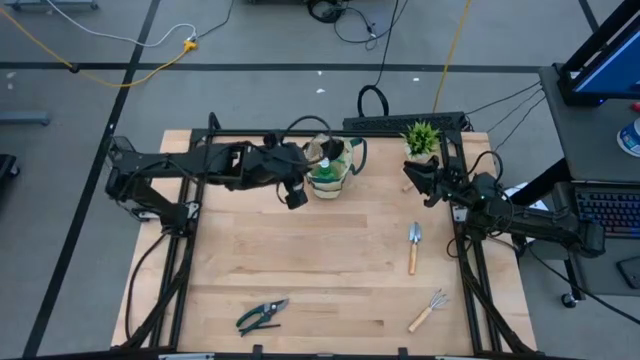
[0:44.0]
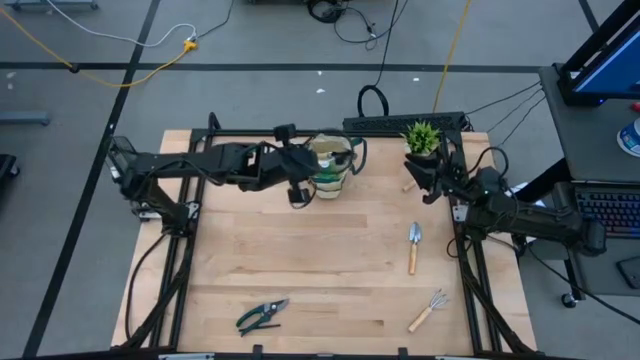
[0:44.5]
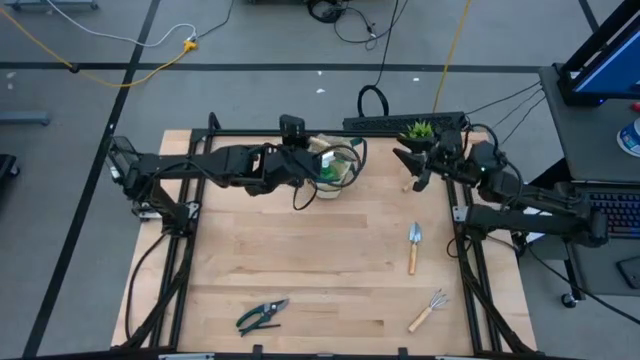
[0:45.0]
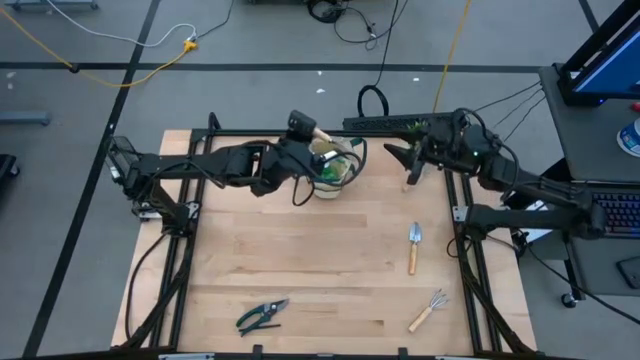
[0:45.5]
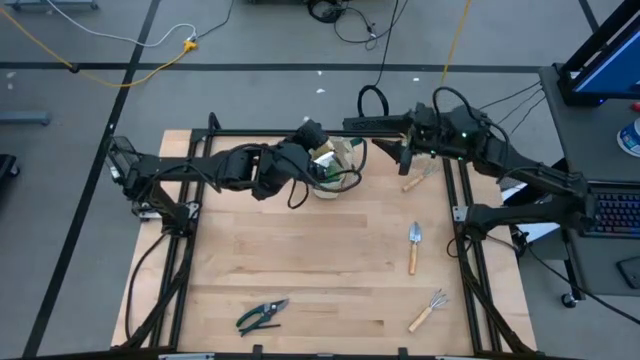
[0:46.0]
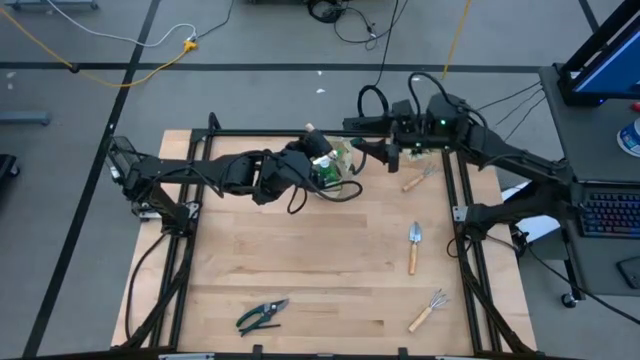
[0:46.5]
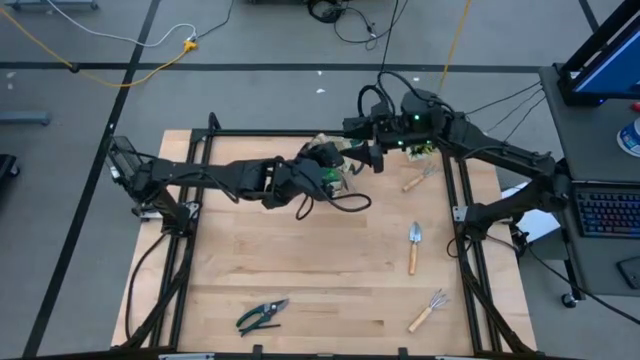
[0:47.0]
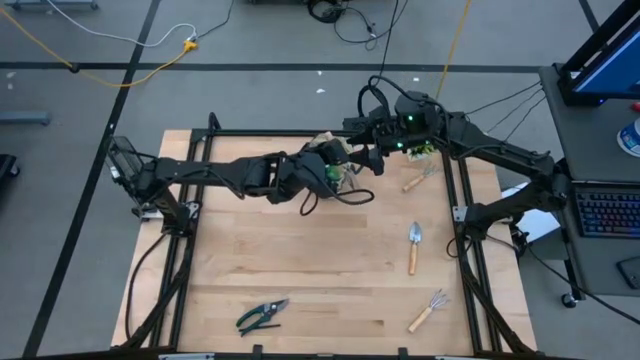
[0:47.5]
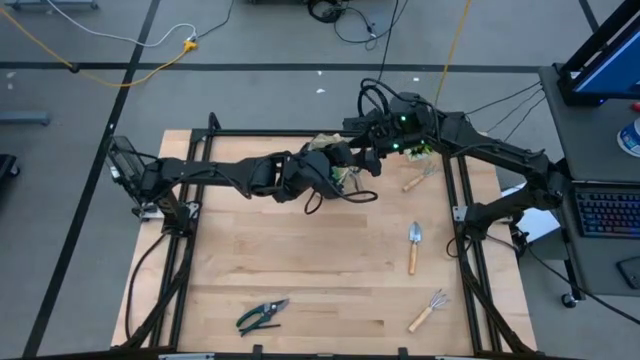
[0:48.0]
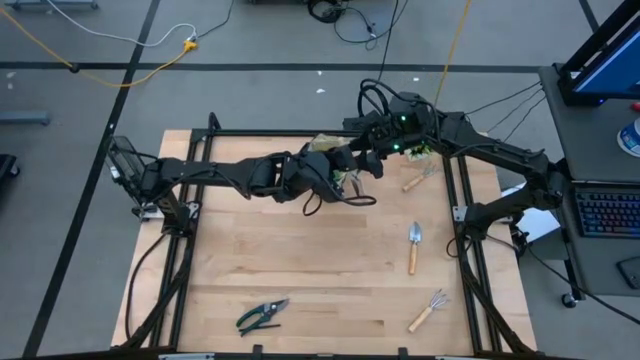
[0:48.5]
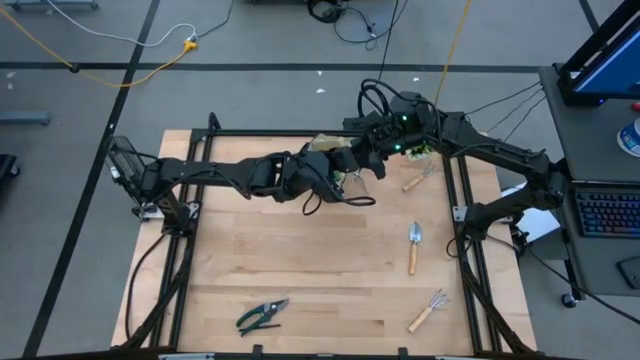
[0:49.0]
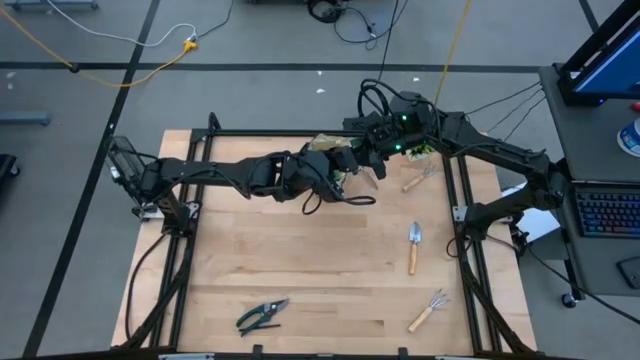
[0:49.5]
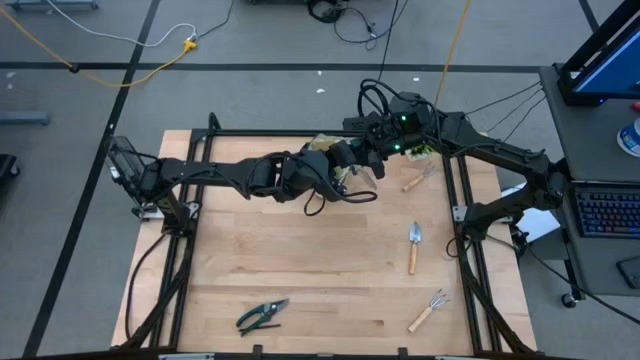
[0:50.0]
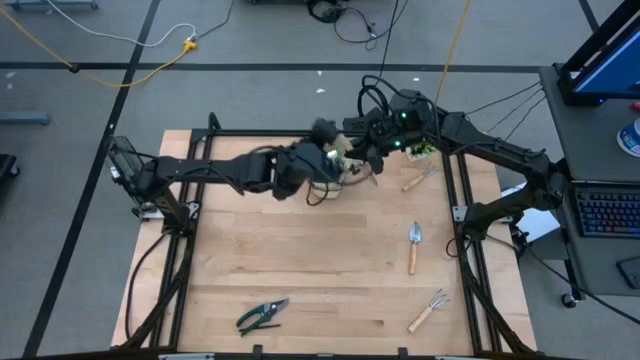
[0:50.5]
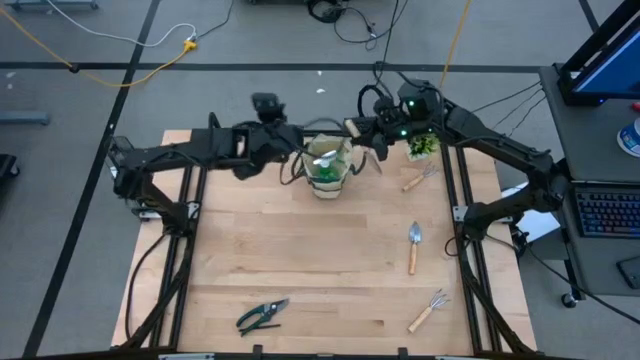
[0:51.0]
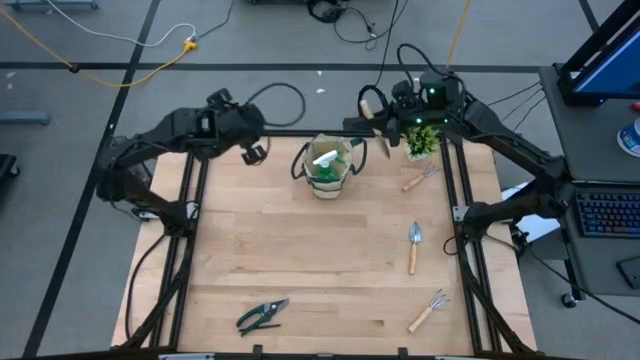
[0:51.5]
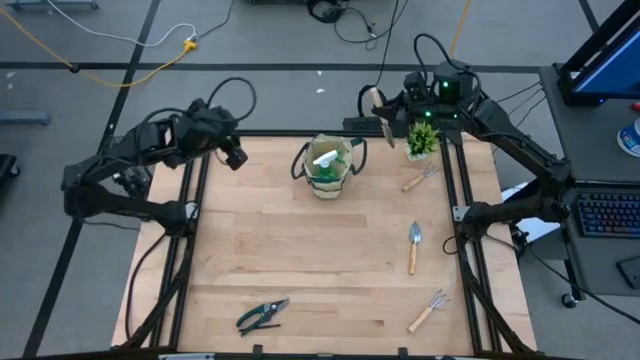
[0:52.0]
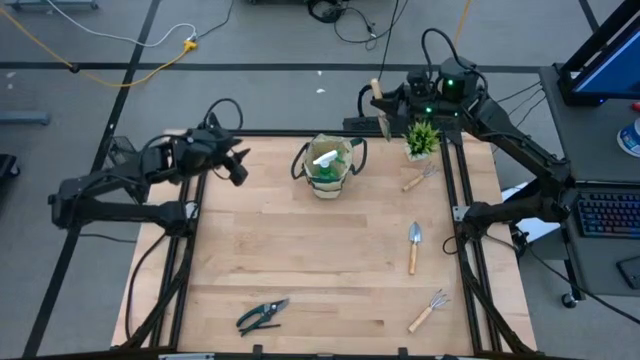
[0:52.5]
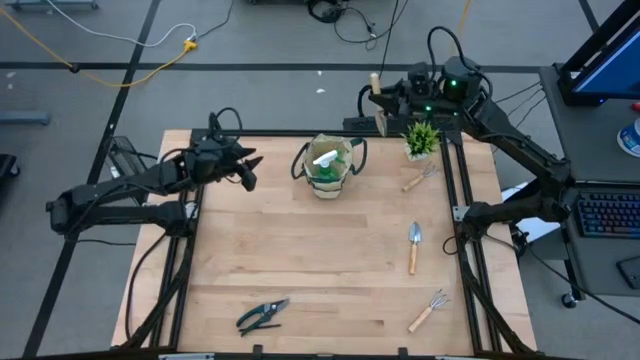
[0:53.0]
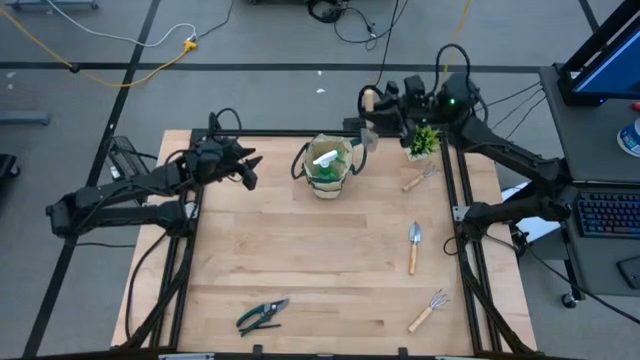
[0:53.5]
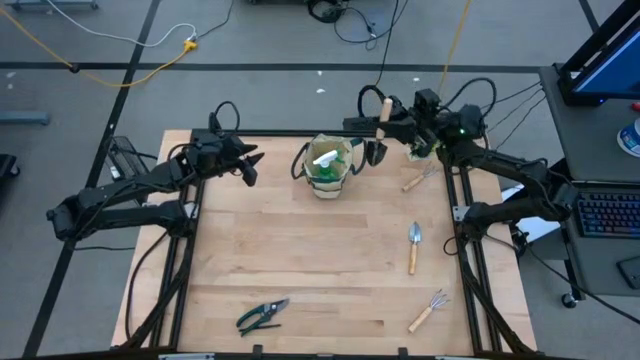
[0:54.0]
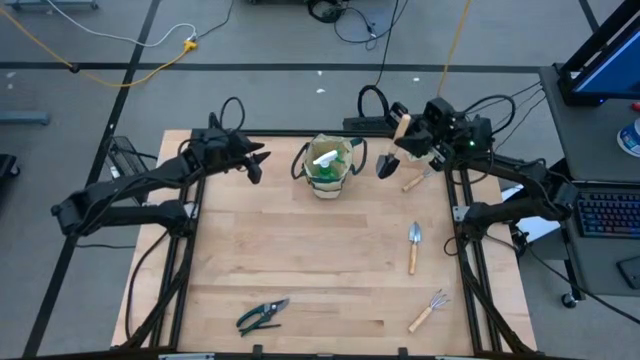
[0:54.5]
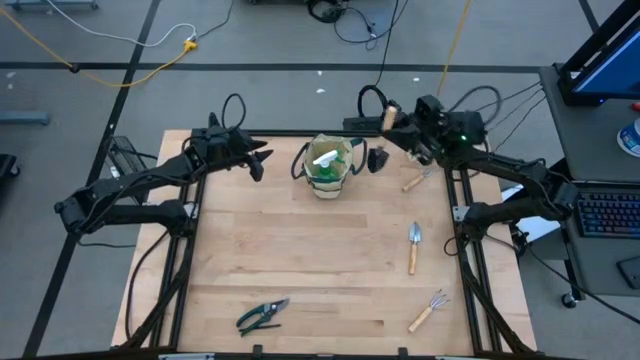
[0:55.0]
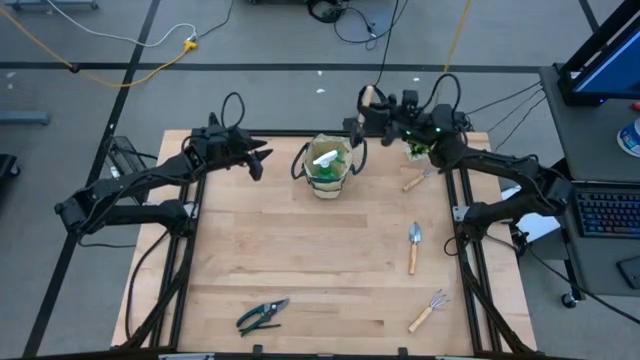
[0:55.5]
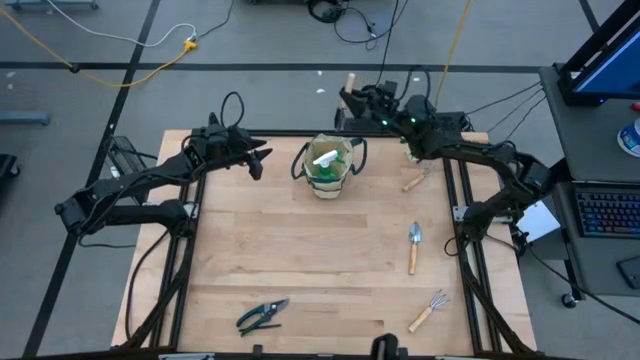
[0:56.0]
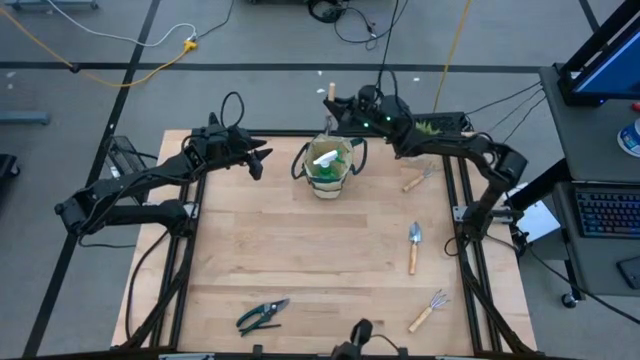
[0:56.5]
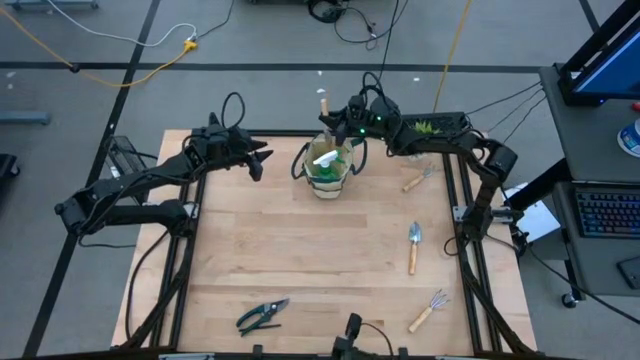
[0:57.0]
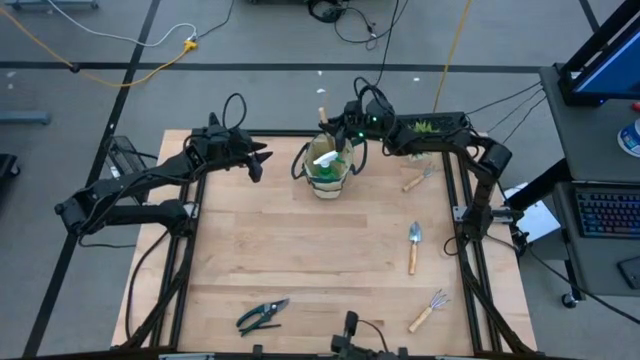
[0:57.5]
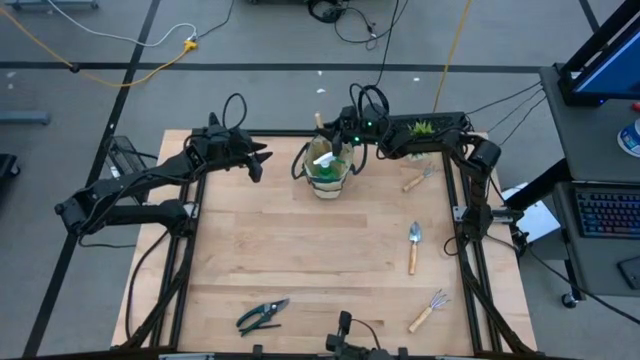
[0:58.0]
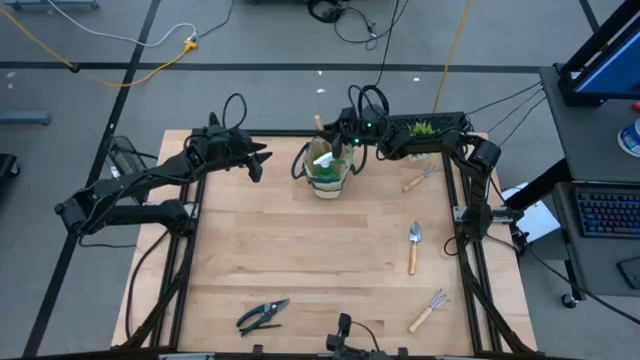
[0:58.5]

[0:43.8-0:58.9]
Task: Pick & Place Garden tools in Gardening bag
Put the top brown trowel into the gardening bag

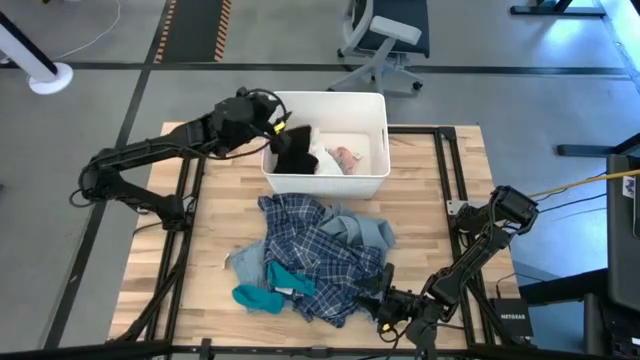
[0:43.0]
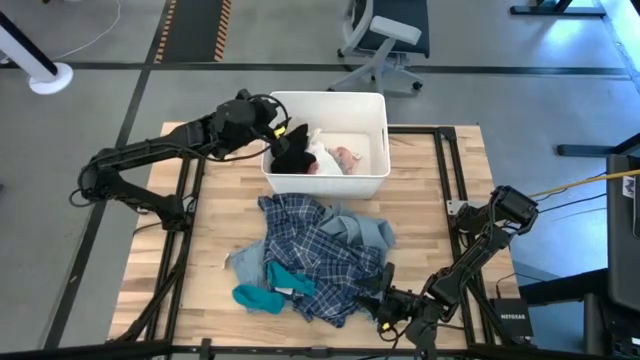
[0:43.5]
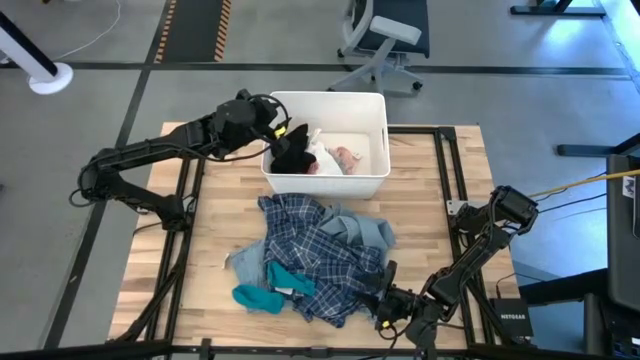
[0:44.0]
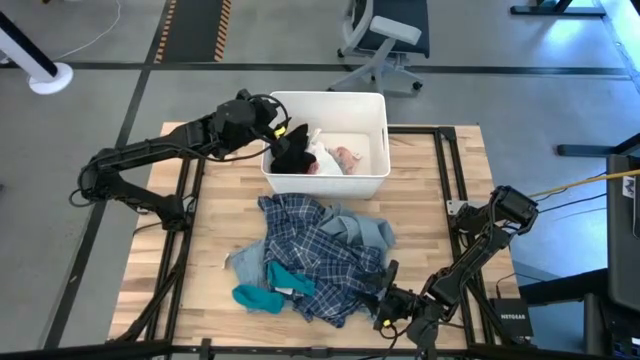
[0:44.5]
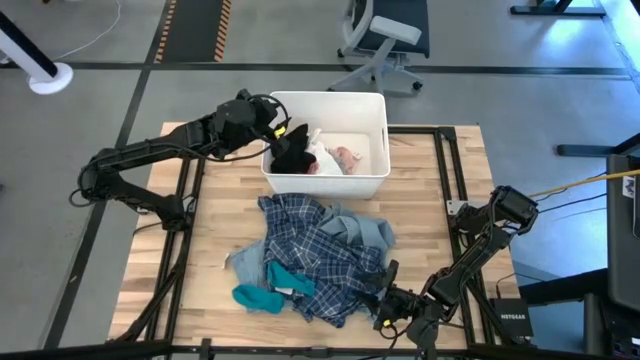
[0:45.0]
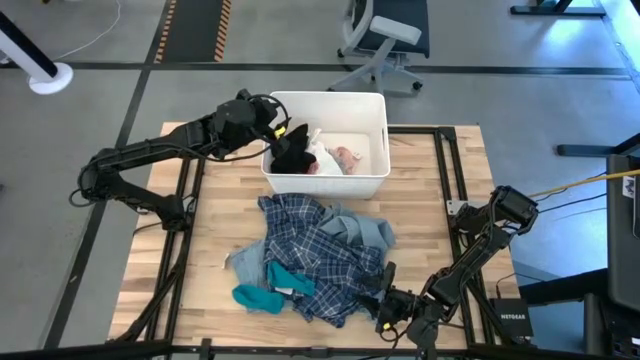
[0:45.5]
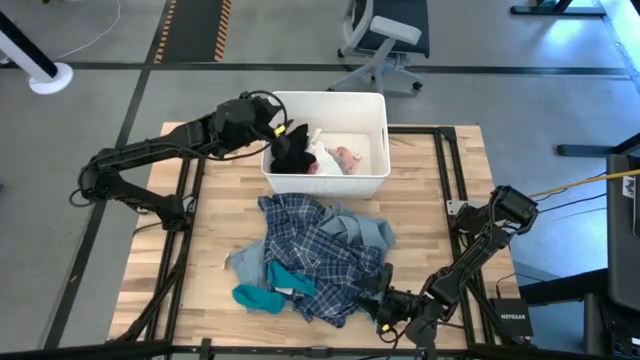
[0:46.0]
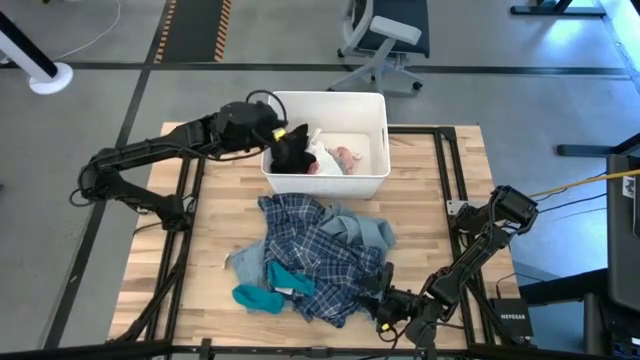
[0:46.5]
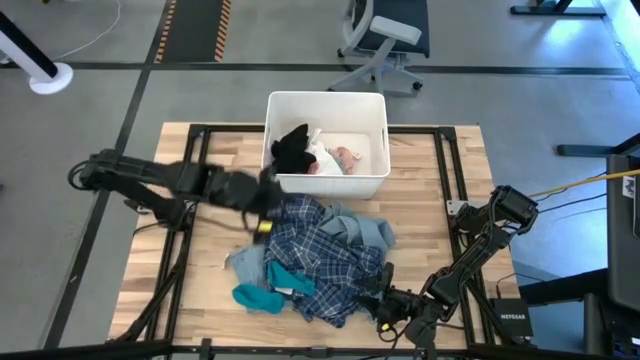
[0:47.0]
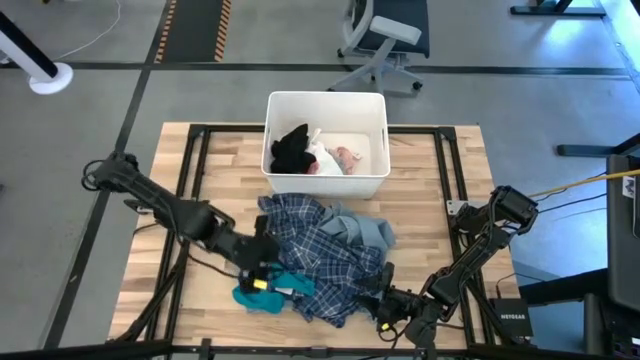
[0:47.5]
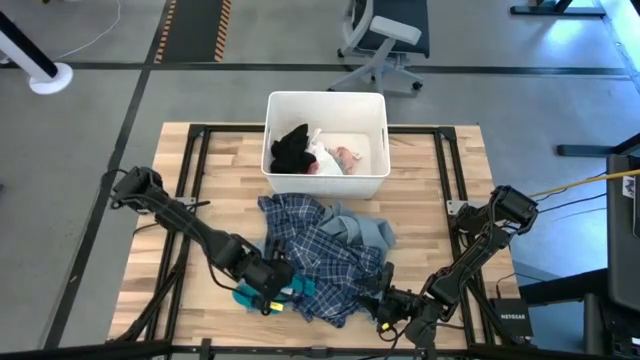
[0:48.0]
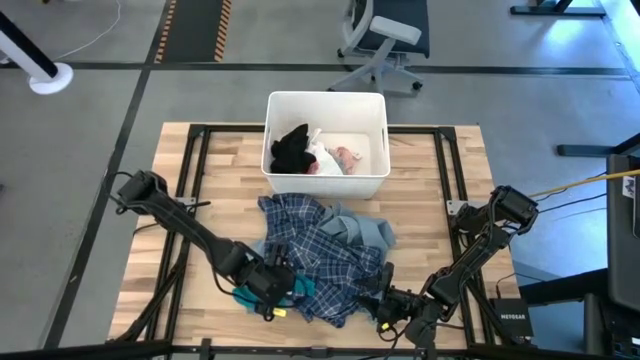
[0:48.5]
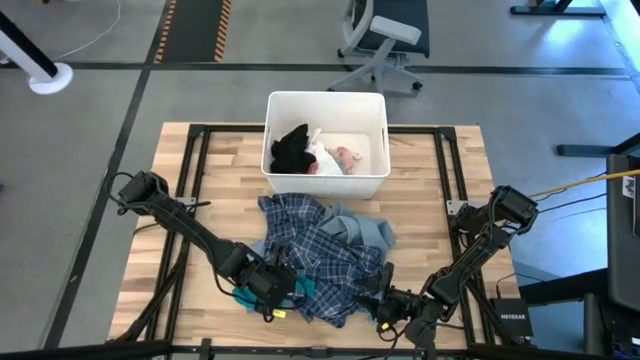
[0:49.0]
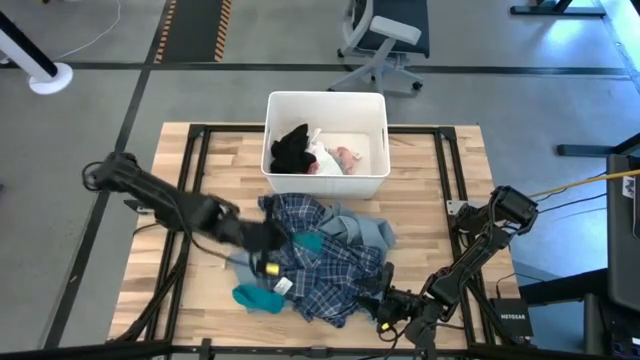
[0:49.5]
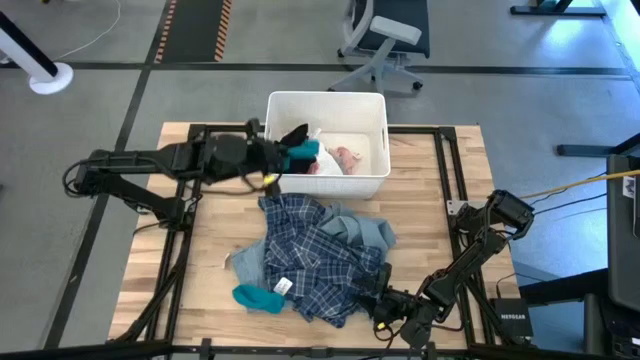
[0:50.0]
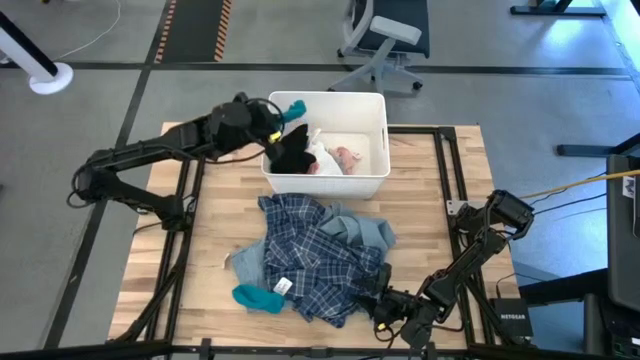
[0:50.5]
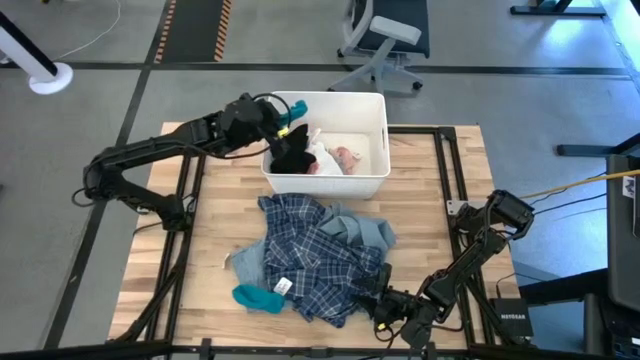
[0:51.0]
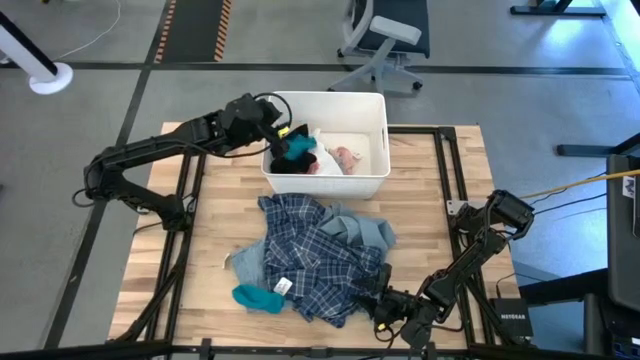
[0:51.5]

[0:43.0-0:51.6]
Task: Sort clothes
Put the top blue sock into the white laundry bin
